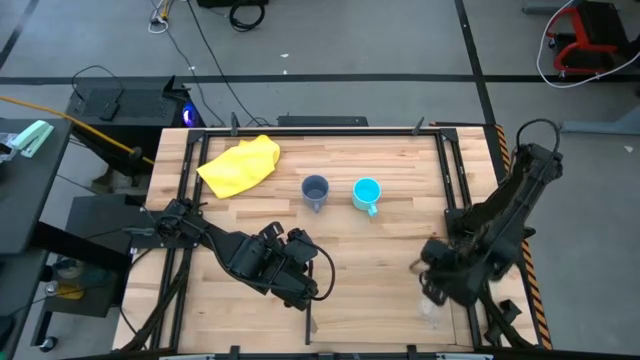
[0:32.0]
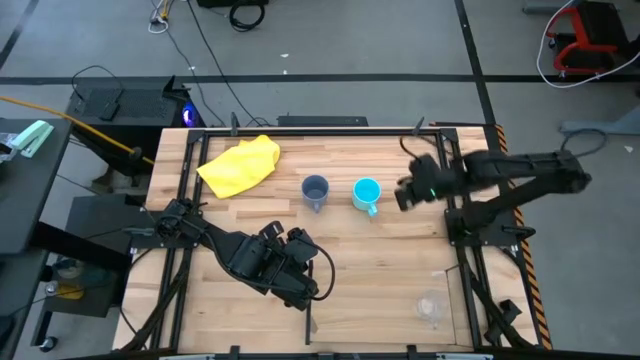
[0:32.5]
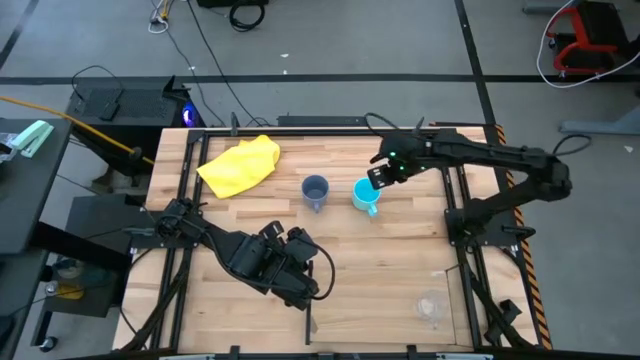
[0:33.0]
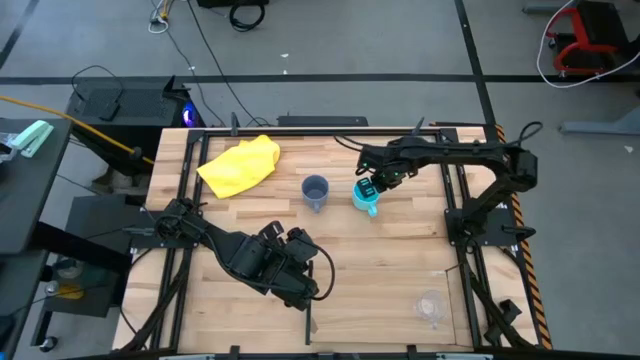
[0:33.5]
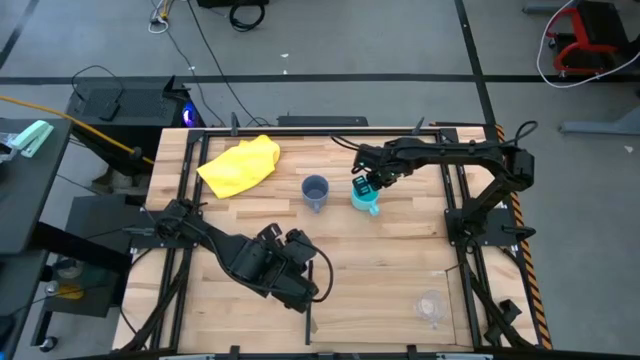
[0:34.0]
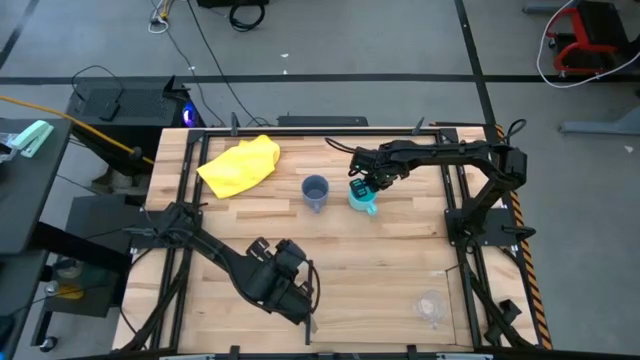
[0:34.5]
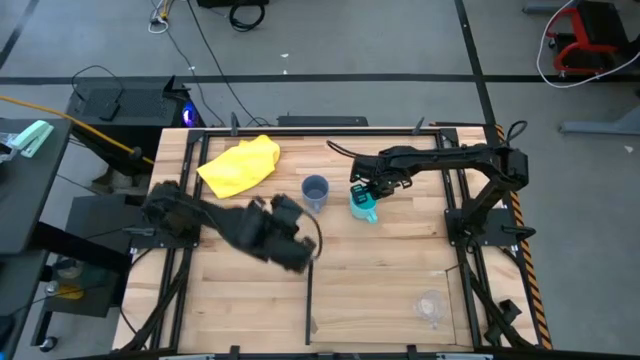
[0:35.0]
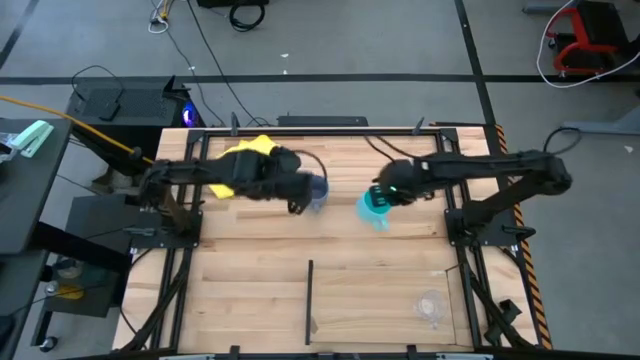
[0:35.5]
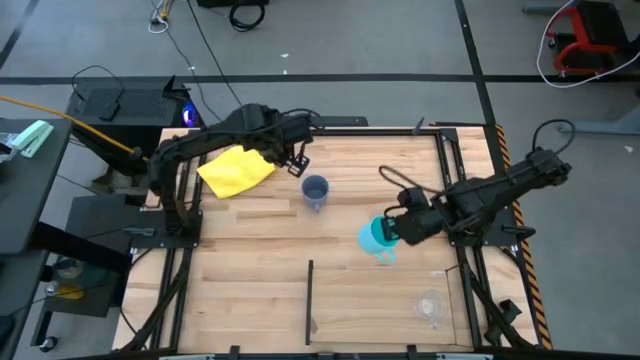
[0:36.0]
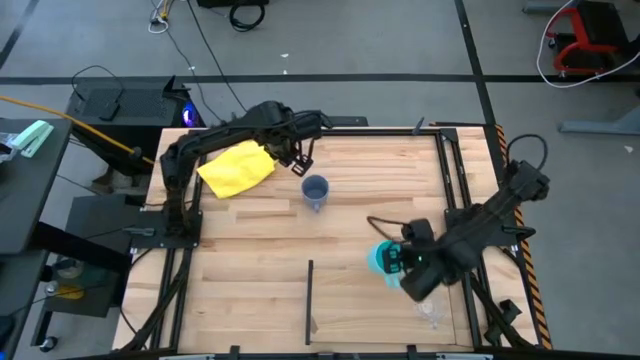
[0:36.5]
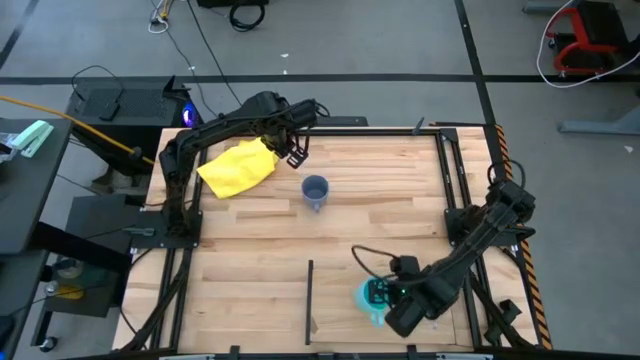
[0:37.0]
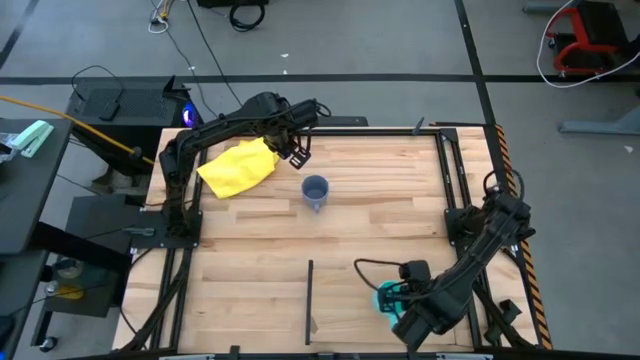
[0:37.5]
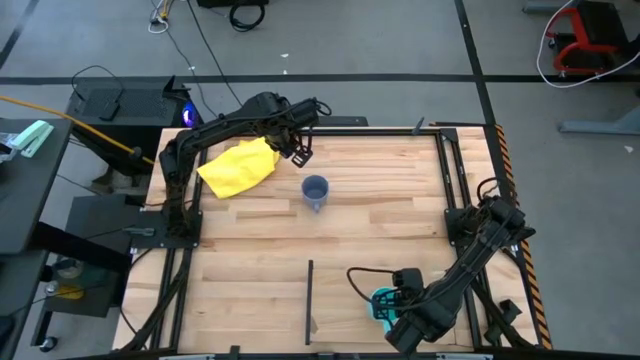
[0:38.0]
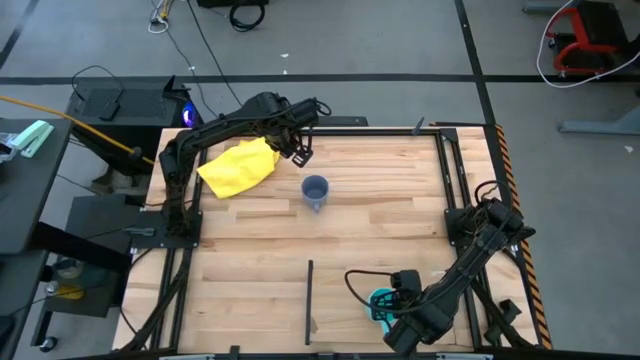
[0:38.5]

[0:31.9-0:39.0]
Task: Stack small to large cups/mugs on shelf
Put the blue mug on the shelf

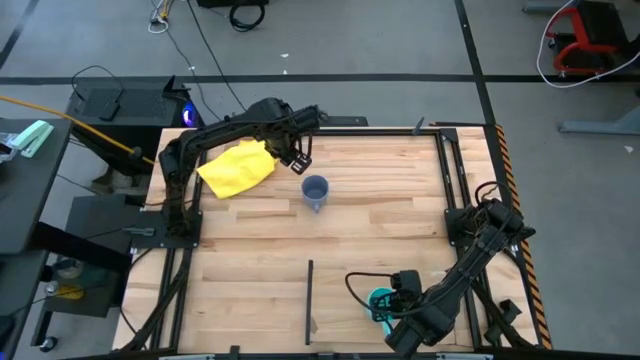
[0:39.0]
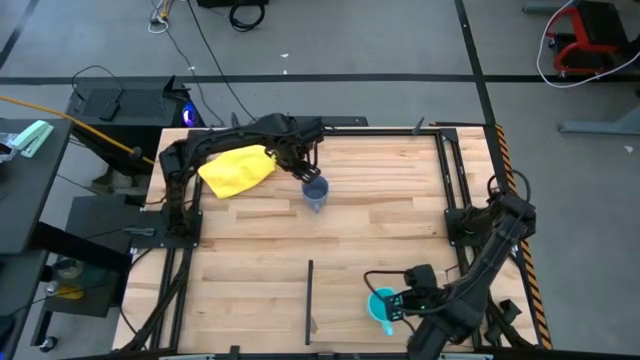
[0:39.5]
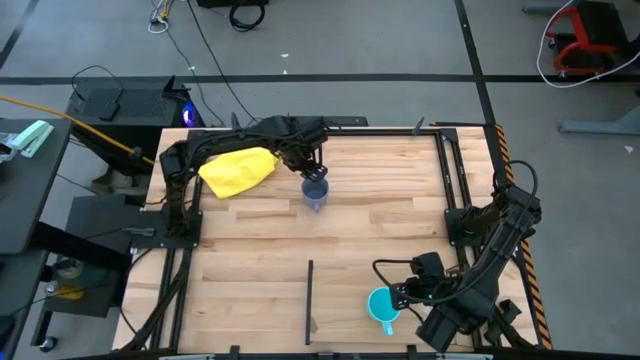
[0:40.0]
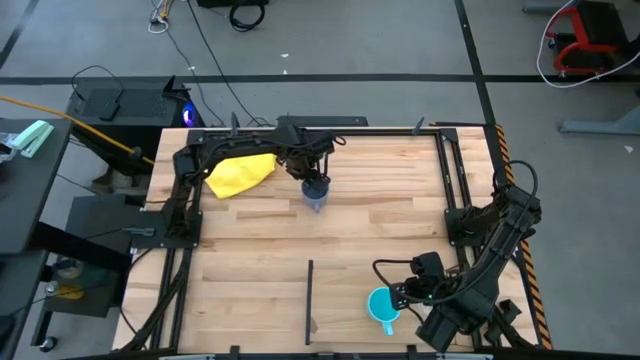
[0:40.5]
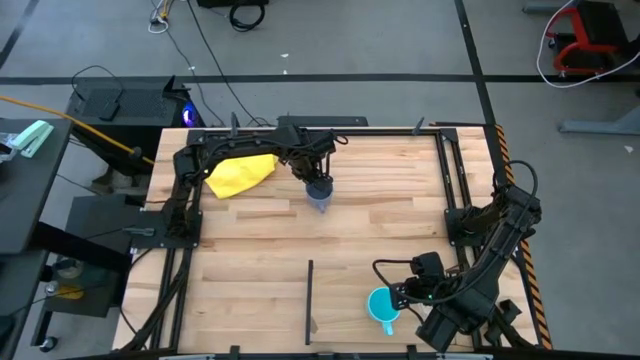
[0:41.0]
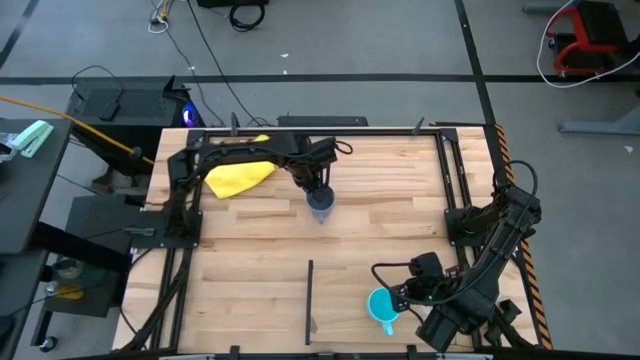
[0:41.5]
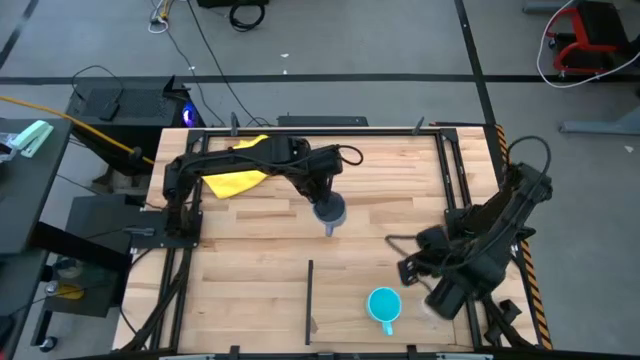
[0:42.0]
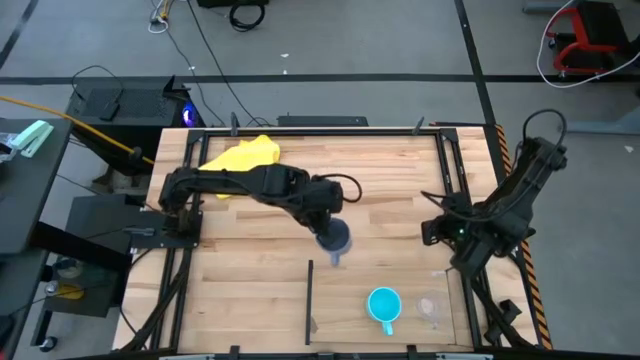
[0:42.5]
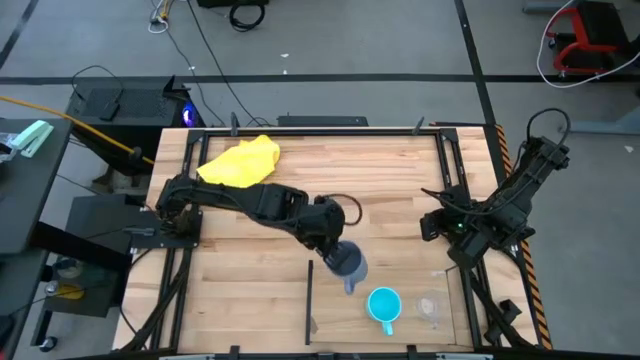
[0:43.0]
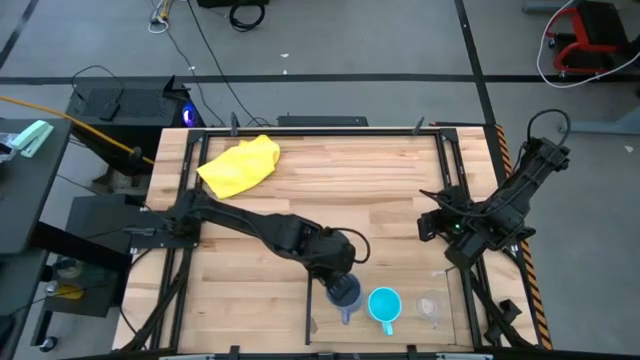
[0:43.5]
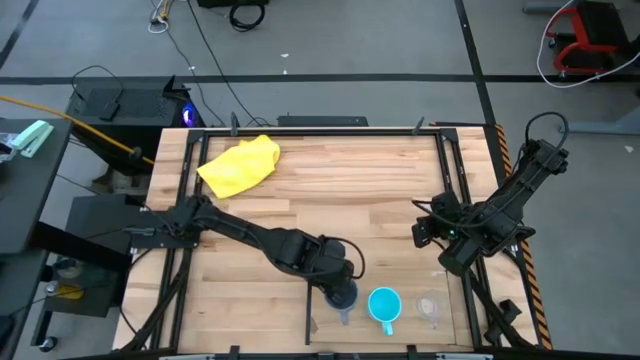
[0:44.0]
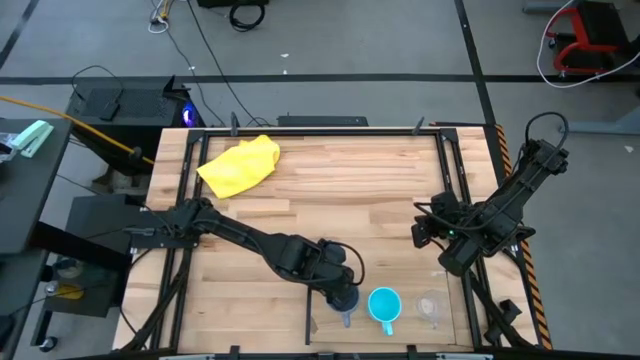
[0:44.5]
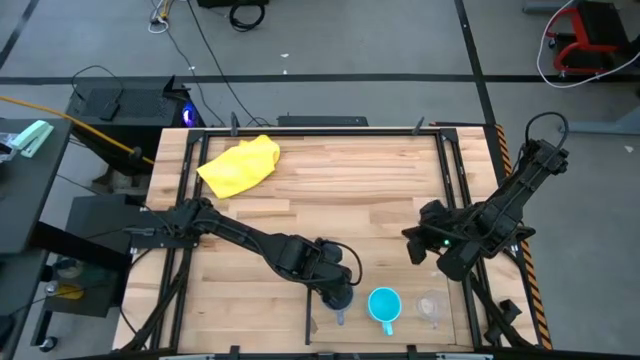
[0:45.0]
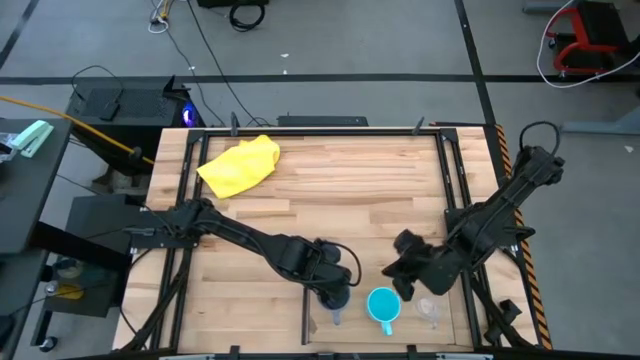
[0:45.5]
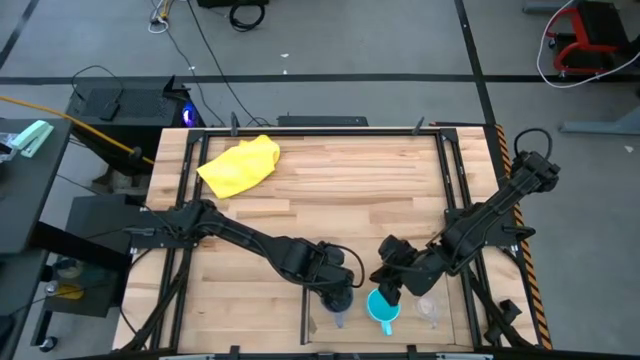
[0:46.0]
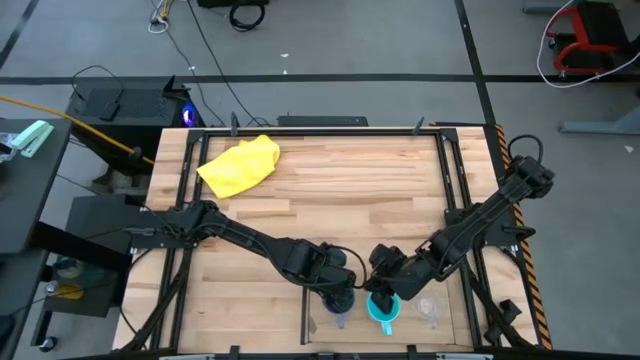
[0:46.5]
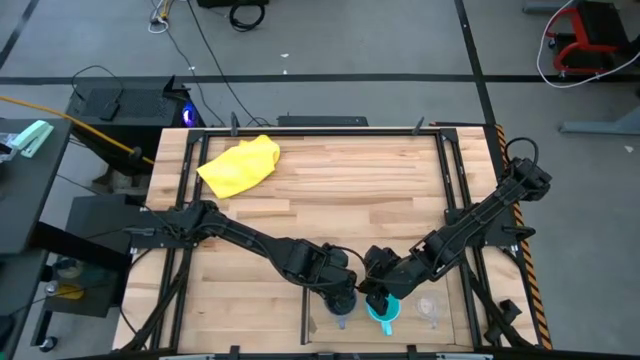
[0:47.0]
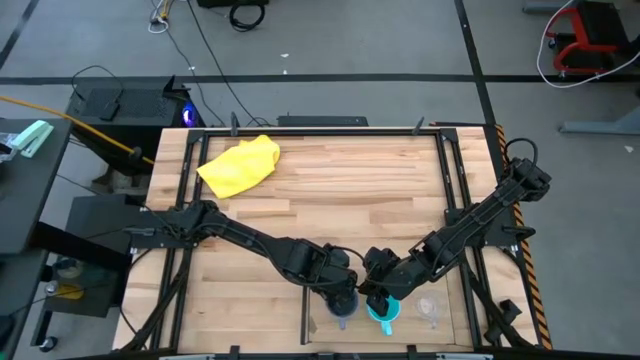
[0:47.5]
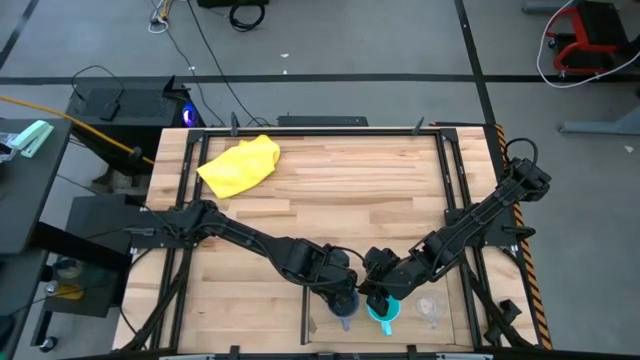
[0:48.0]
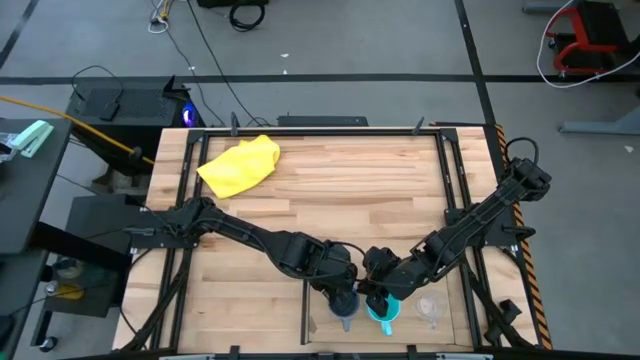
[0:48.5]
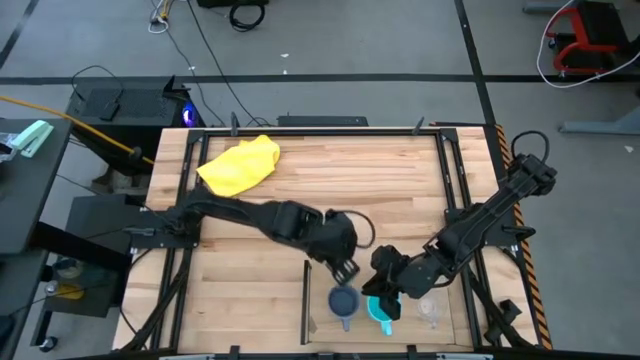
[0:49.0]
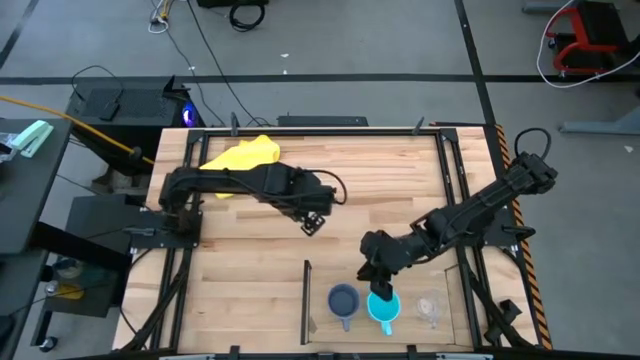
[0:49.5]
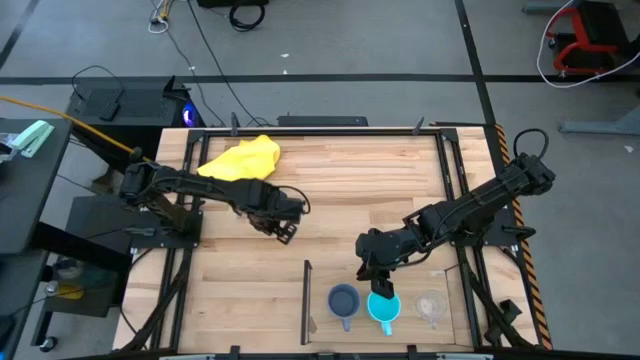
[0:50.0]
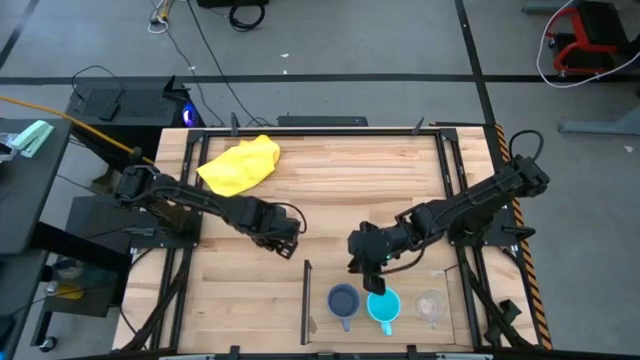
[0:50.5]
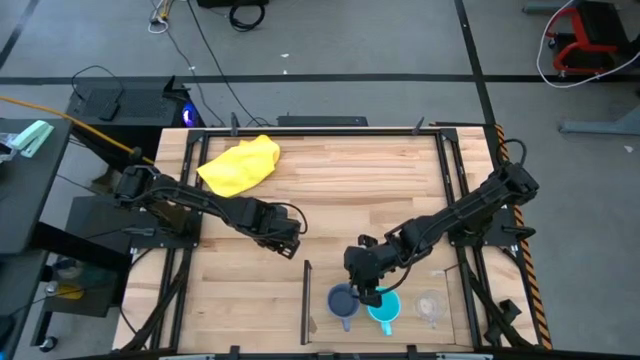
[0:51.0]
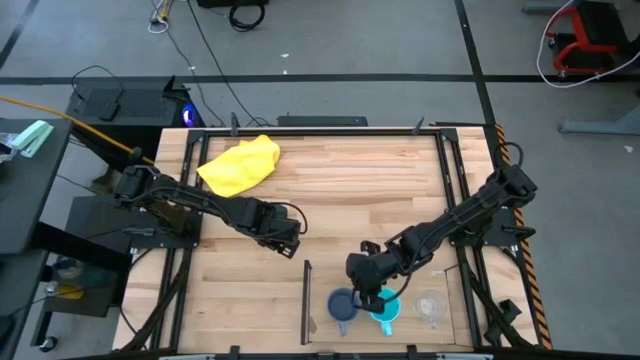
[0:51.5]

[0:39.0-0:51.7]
Put the purple mug on the shelf
